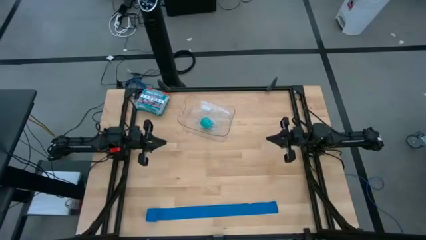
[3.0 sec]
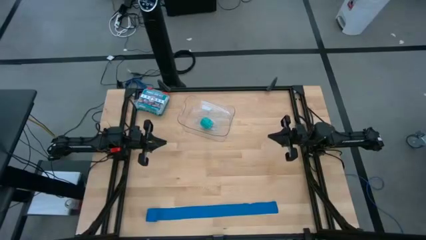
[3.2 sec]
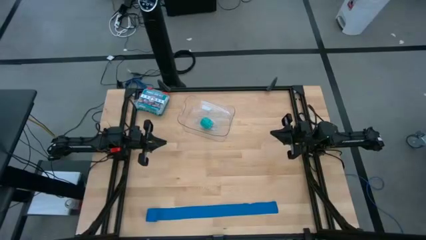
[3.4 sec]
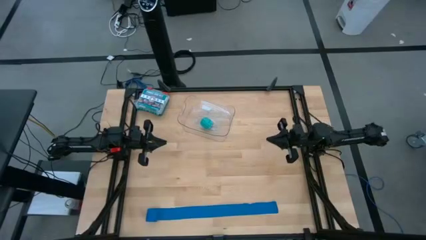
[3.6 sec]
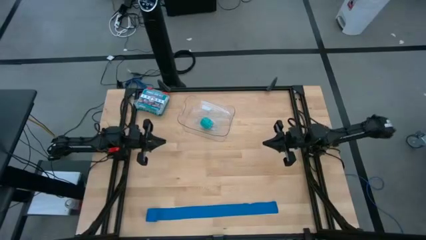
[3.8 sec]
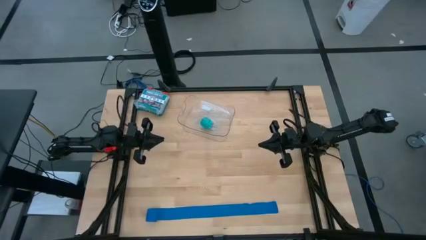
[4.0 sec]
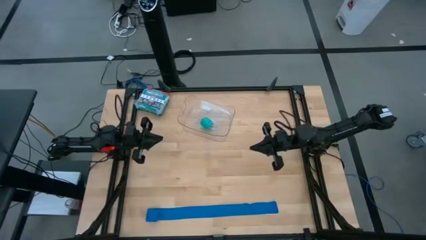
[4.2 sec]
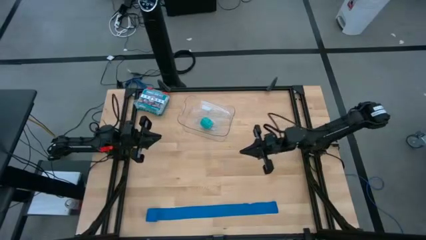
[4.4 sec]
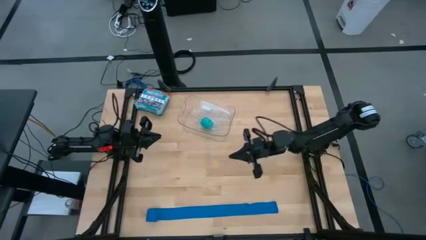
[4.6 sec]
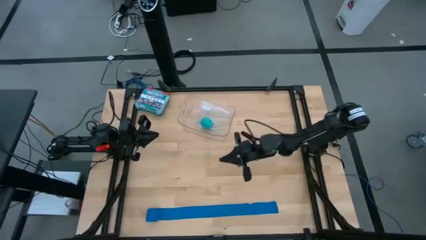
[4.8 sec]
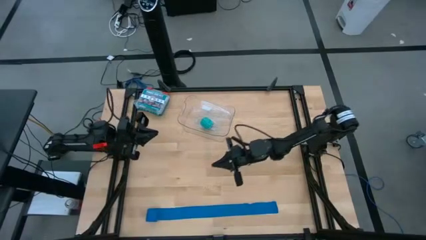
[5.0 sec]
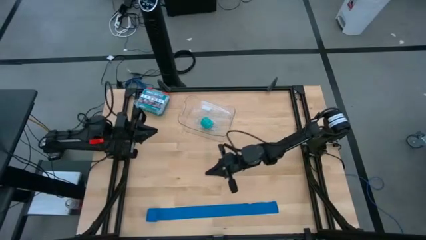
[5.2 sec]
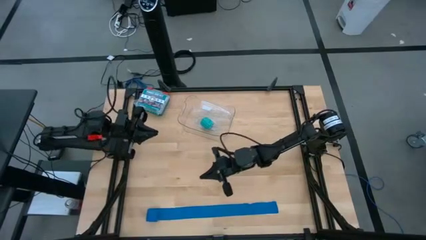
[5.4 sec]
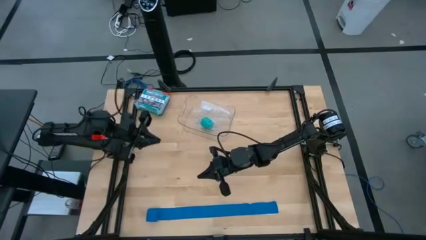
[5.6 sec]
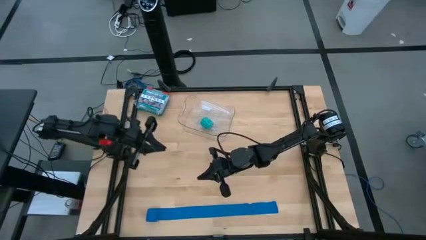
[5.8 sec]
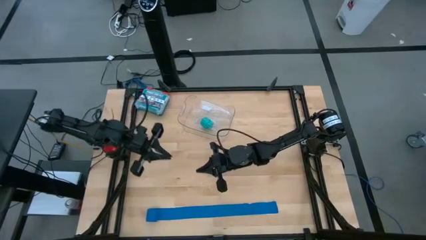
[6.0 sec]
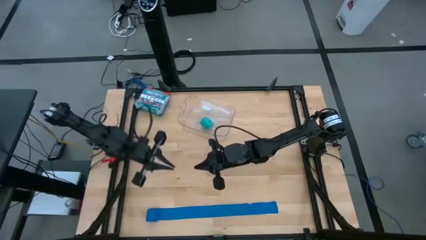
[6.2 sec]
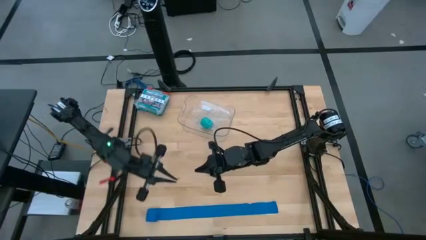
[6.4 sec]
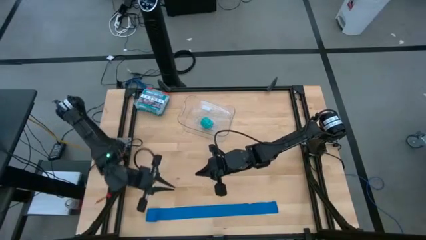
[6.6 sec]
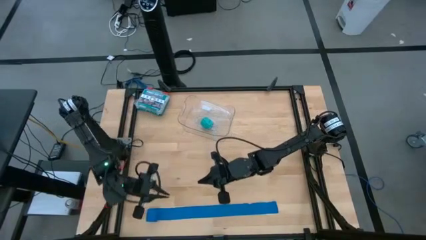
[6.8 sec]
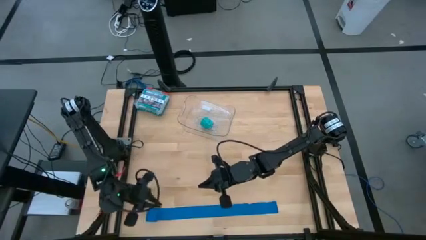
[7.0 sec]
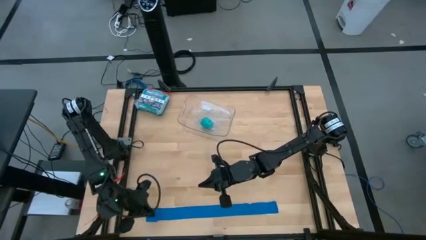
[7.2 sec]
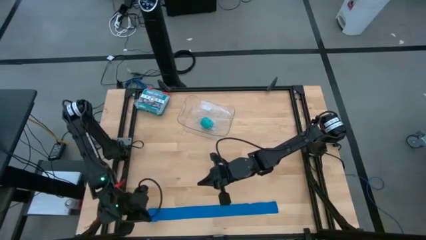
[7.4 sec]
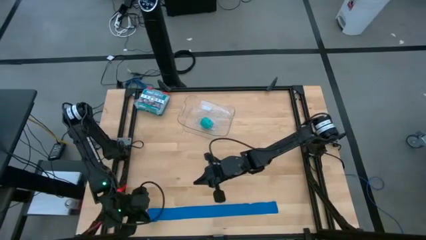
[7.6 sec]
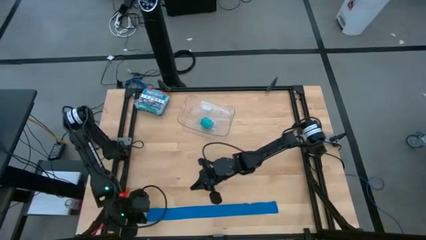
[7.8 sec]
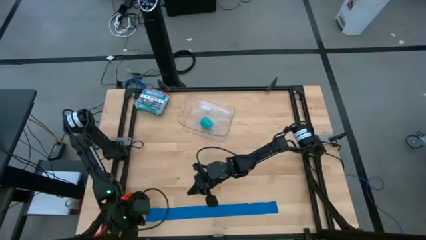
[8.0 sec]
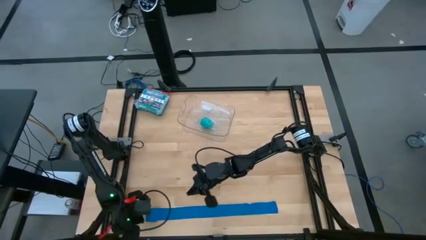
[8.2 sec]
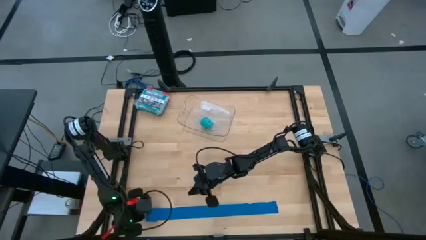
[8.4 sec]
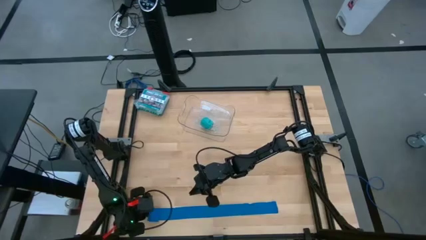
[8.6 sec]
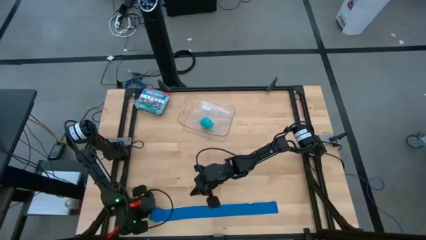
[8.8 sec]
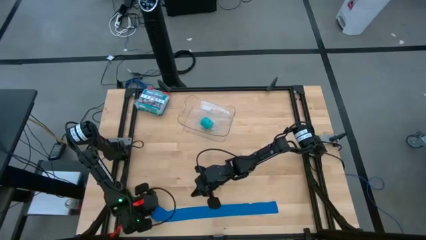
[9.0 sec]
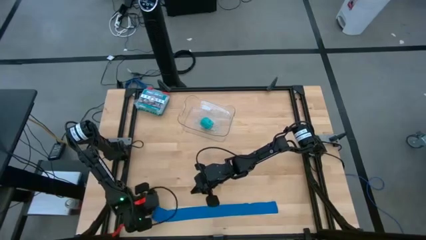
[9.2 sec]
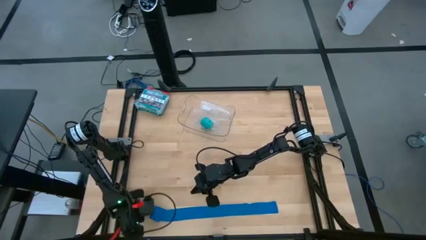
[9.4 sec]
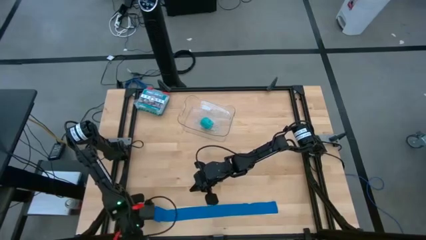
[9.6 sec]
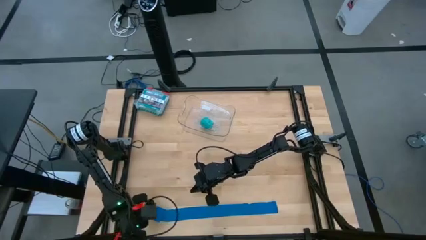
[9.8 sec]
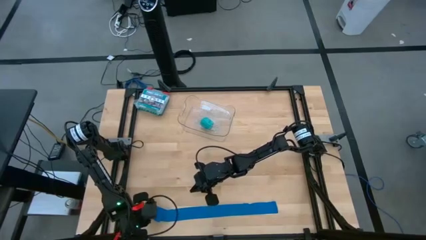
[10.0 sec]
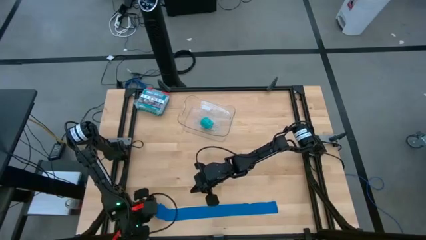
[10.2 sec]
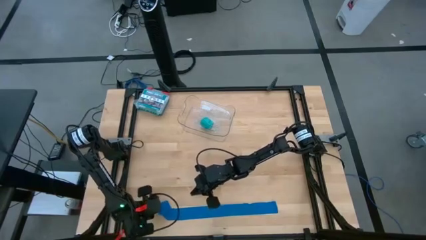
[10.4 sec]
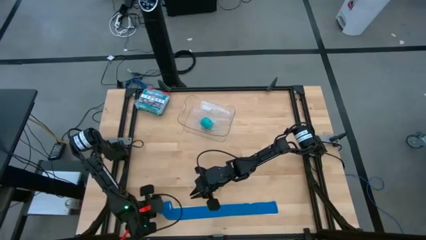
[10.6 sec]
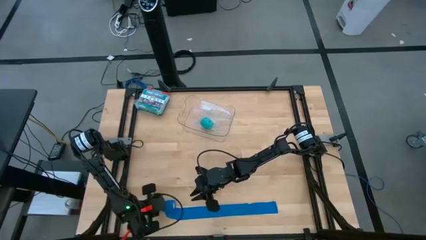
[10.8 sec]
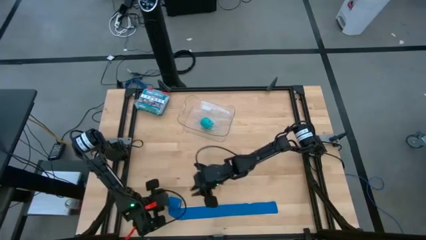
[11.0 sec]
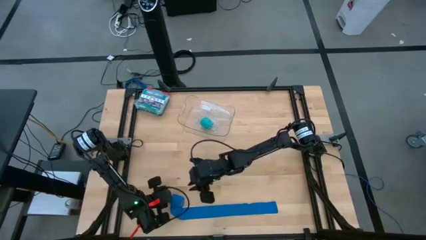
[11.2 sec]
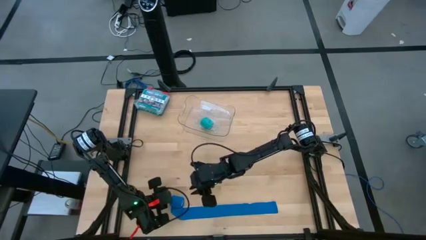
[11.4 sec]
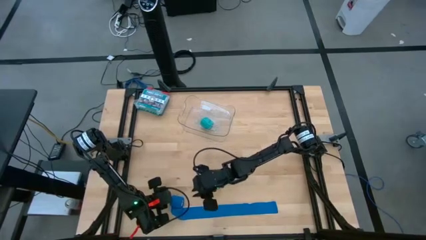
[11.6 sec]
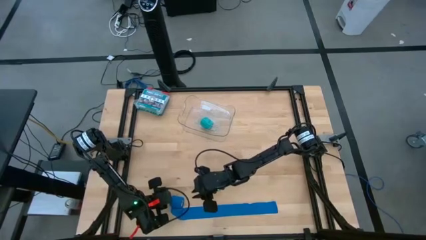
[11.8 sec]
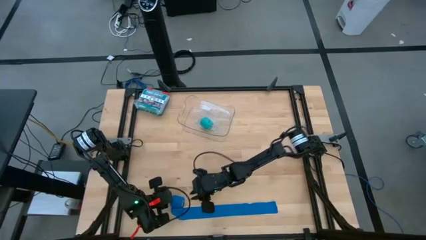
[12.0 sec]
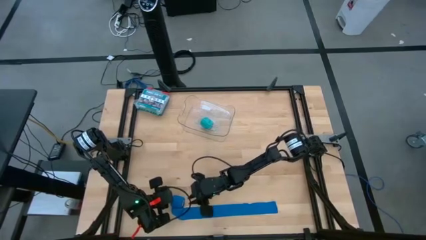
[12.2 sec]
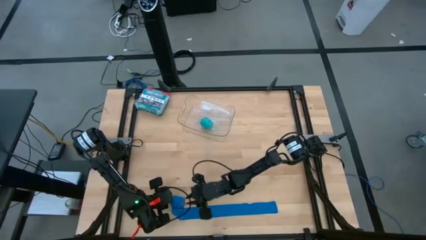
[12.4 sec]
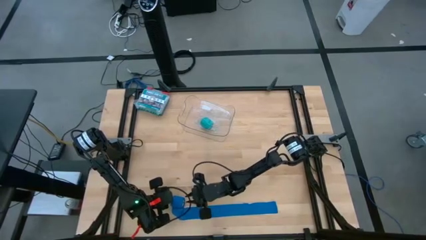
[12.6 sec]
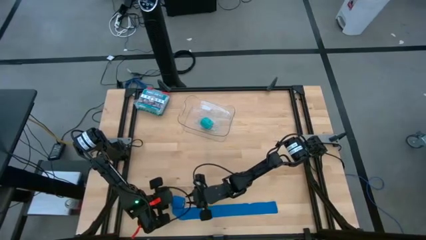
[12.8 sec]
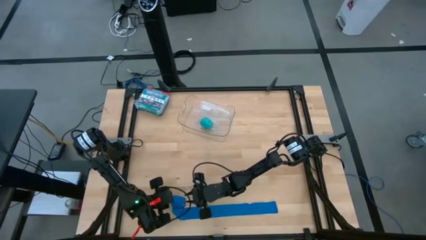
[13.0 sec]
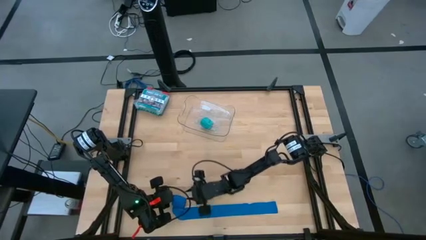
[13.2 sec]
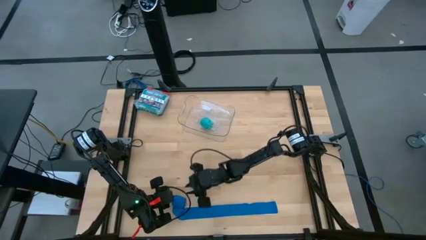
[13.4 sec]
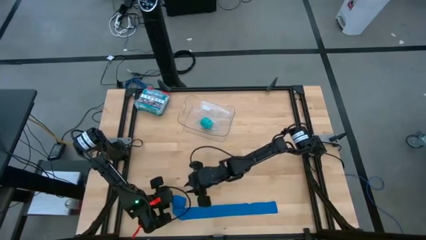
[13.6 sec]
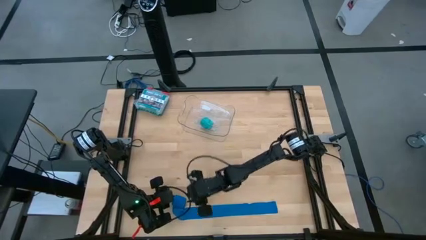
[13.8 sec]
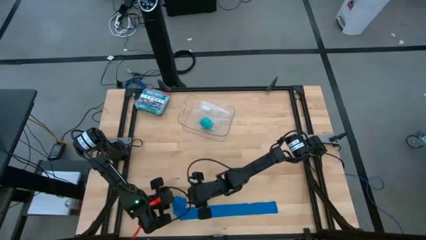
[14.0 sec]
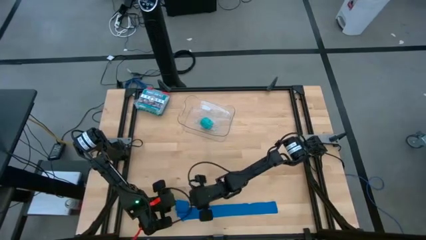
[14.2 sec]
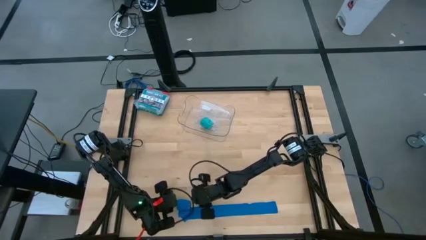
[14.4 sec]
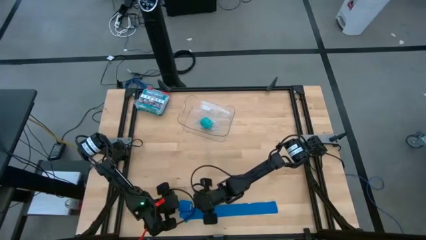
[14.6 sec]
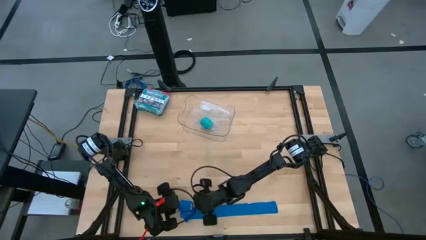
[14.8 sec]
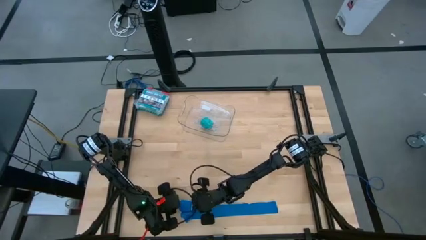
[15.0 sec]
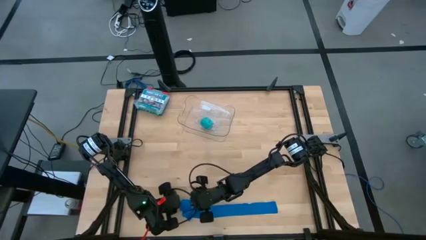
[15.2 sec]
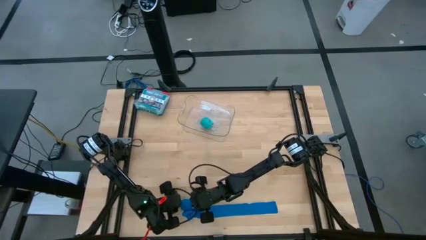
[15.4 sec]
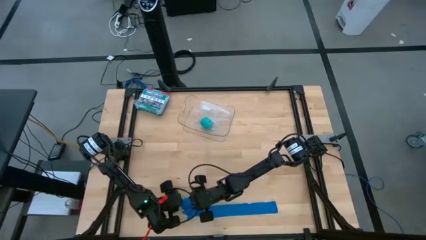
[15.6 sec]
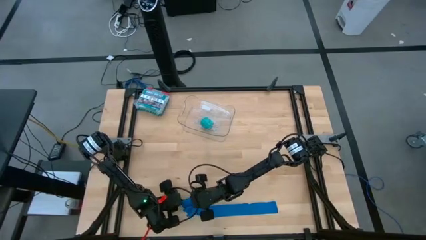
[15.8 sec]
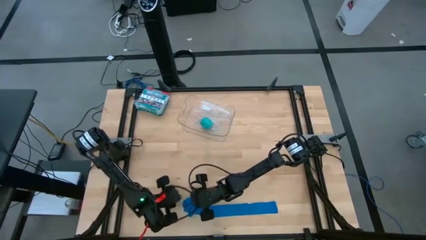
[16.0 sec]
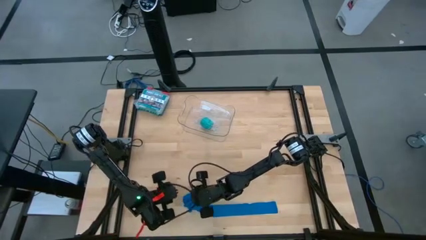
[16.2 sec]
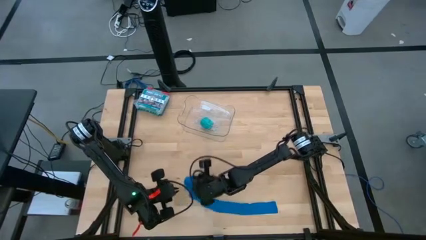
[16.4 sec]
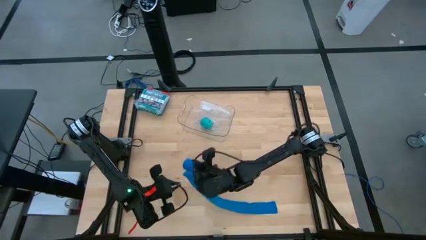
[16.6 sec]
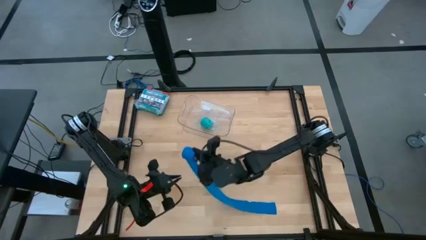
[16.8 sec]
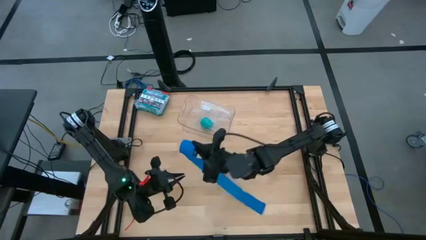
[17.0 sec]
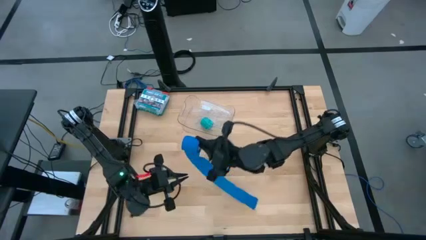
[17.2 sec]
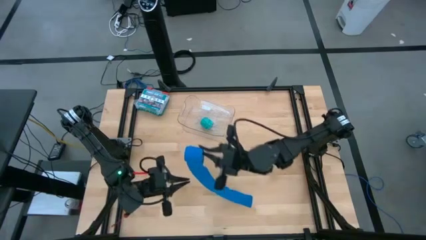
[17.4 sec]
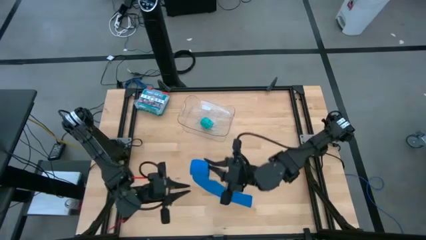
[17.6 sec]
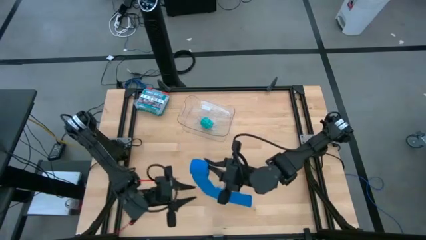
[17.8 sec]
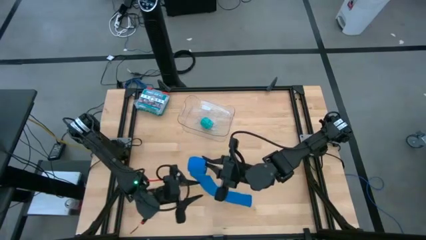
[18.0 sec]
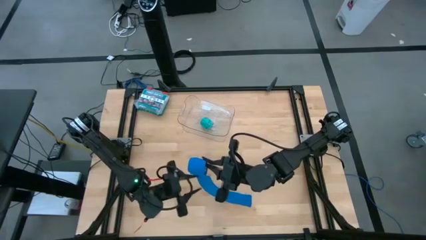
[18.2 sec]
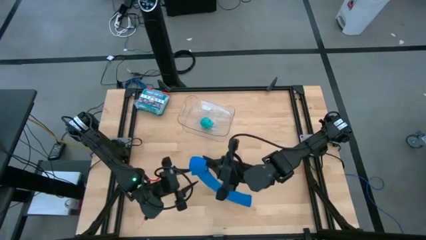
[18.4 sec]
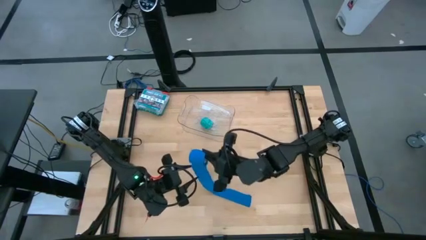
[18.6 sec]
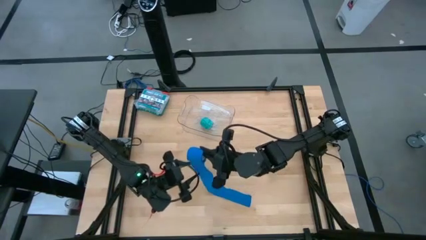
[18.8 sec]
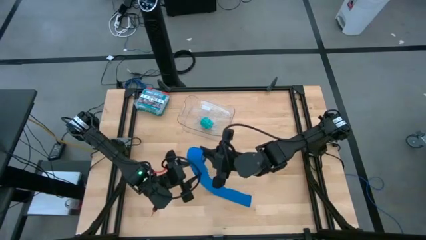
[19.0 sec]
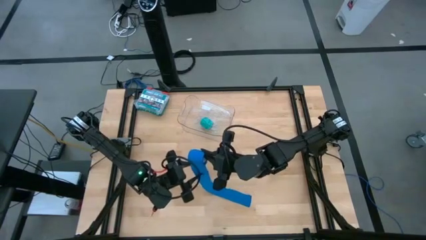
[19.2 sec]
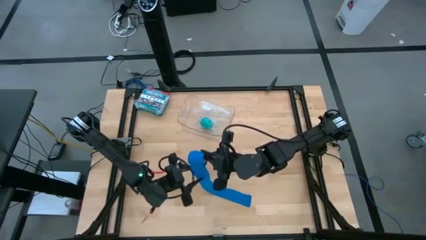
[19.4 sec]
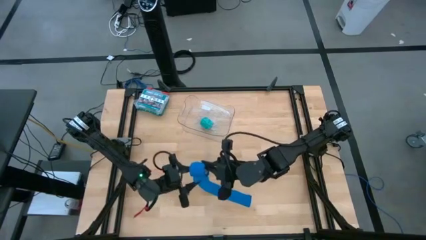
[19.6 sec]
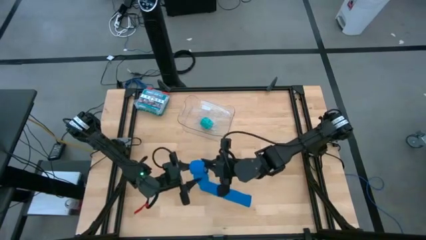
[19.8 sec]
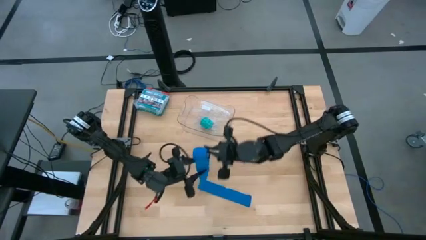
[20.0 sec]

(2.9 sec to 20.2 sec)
Task: Roll bandage
Roll the blue bandage
